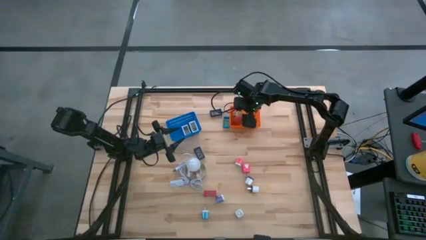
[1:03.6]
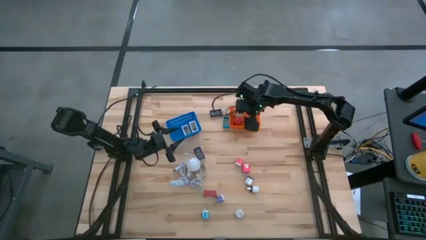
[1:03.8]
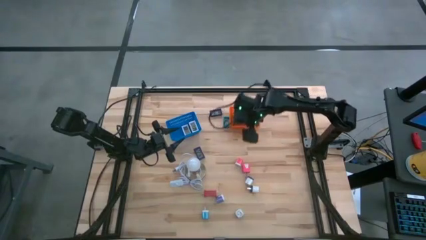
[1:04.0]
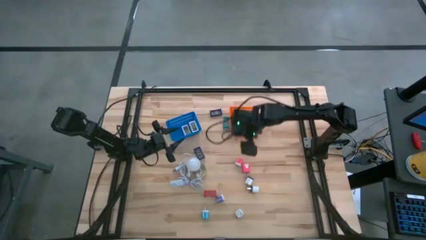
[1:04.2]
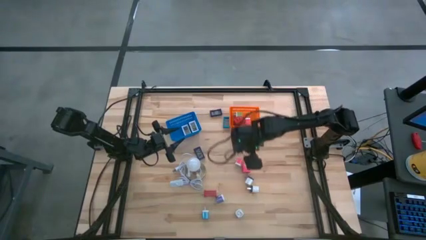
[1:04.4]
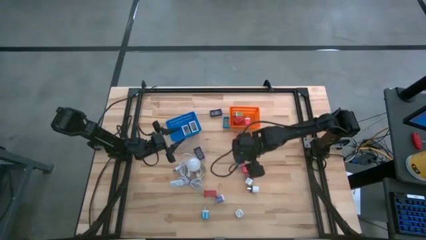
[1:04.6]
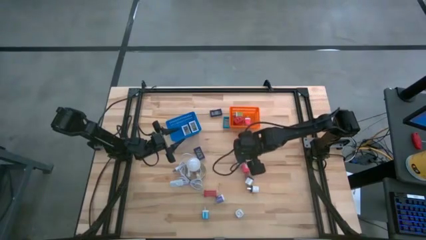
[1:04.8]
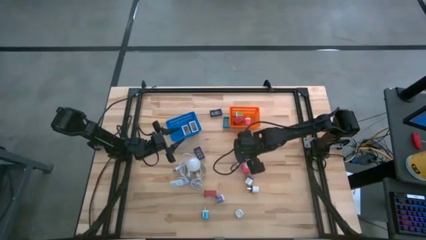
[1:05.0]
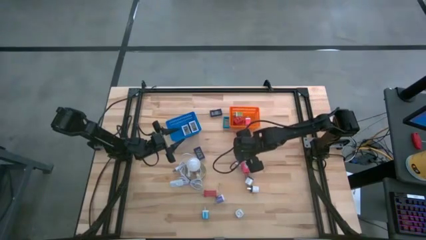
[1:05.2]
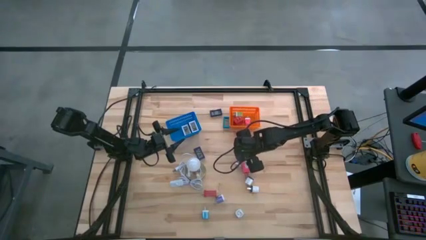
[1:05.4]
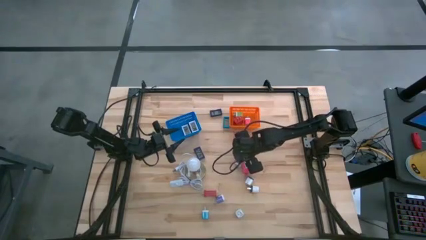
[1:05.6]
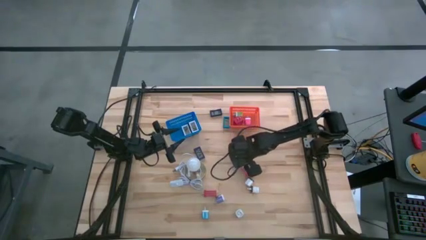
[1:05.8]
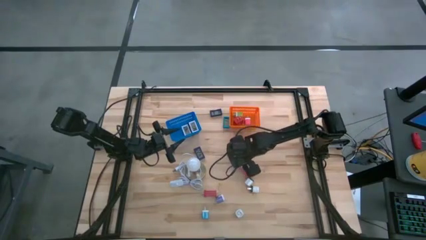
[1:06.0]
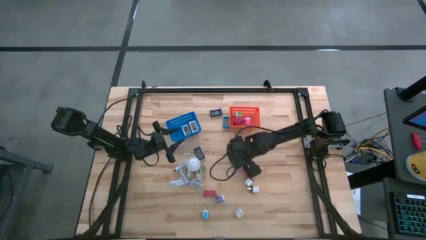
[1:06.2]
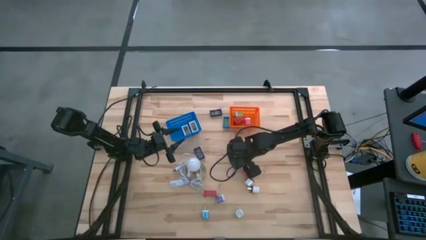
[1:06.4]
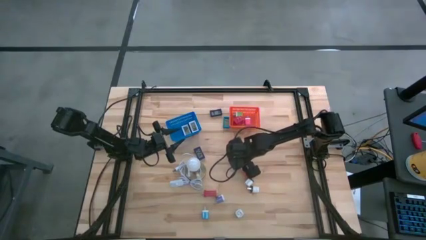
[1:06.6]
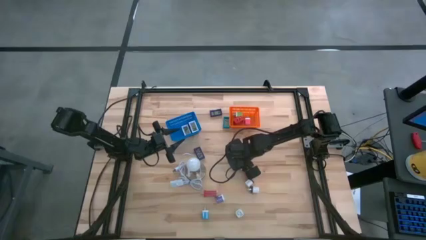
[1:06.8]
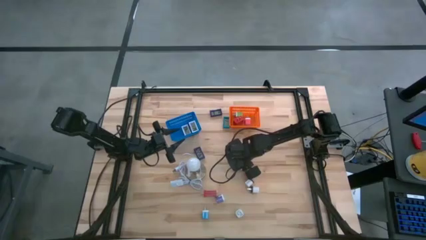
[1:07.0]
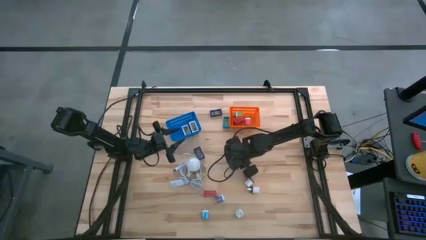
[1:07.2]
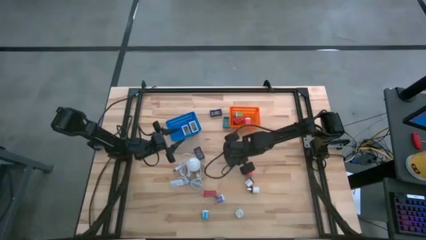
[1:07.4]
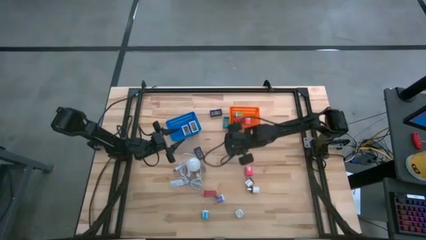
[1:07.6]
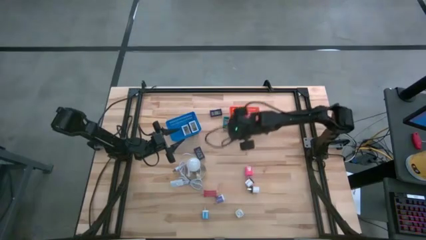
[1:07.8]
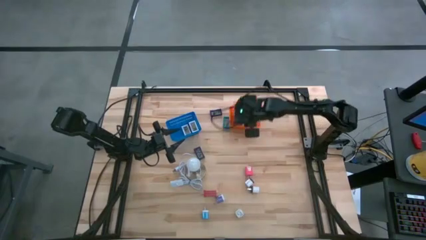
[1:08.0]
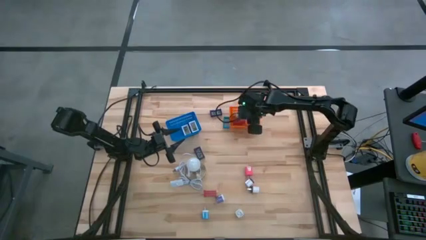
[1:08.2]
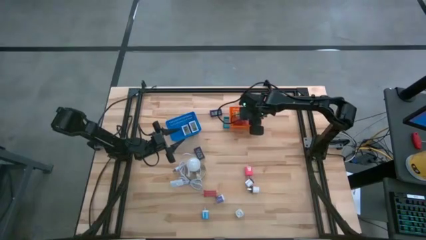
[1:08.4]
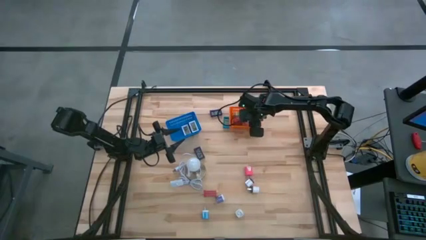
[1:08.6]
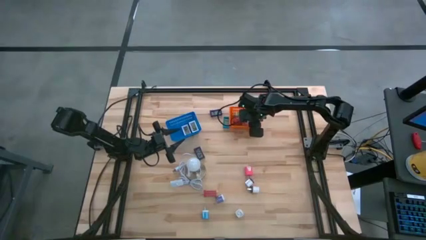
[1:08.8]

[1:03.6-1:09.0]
Task: Pick & Place Office items
Put the top pink charger adapter into the orange bin

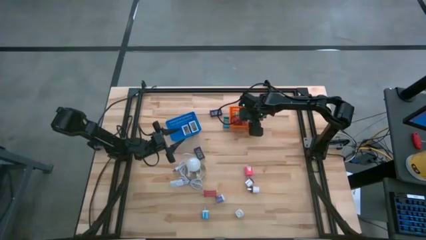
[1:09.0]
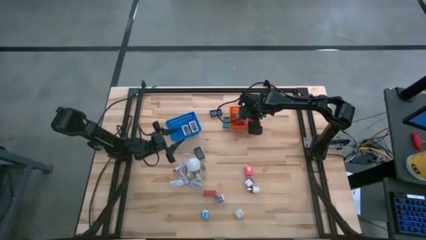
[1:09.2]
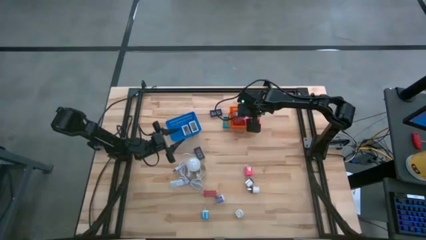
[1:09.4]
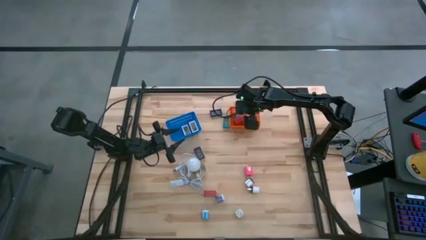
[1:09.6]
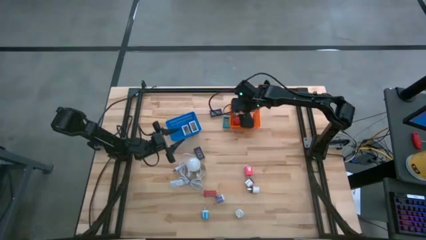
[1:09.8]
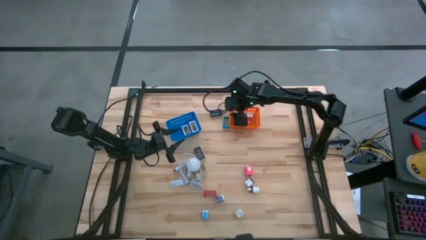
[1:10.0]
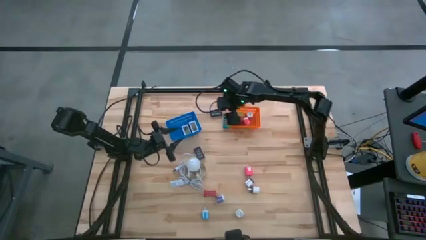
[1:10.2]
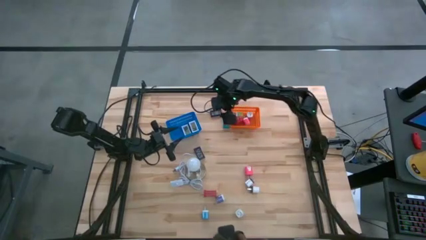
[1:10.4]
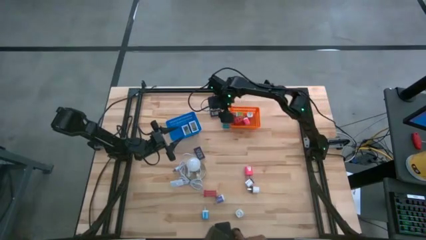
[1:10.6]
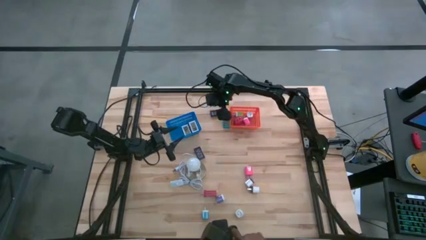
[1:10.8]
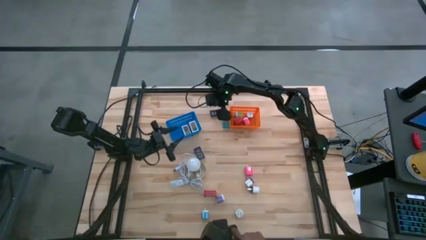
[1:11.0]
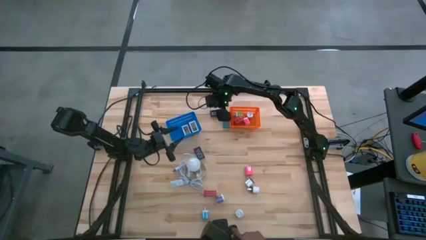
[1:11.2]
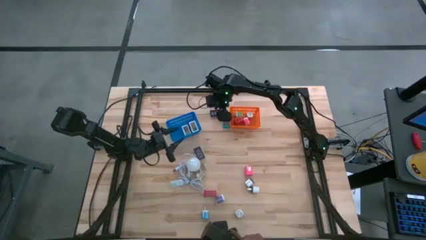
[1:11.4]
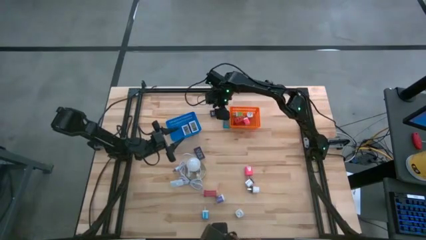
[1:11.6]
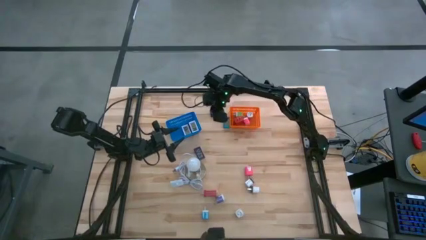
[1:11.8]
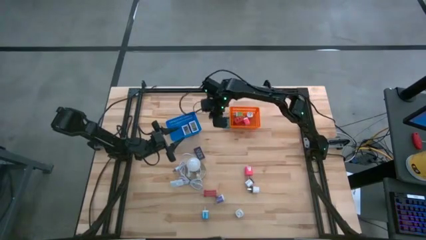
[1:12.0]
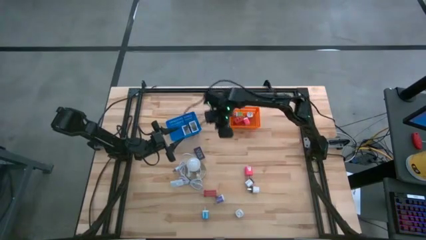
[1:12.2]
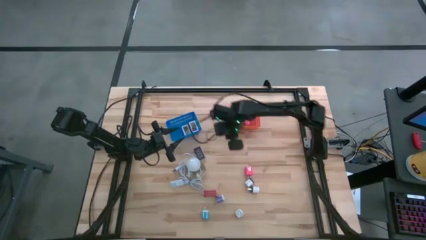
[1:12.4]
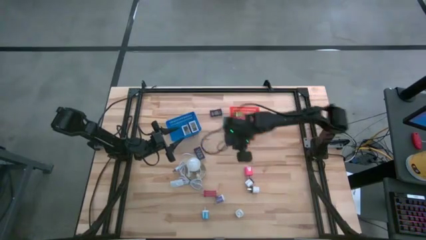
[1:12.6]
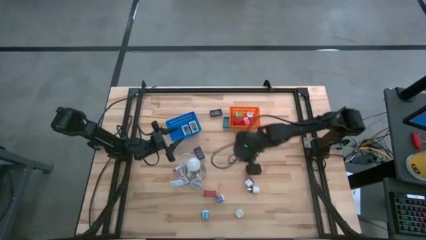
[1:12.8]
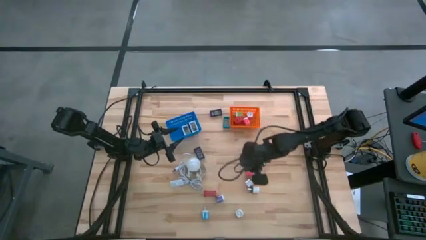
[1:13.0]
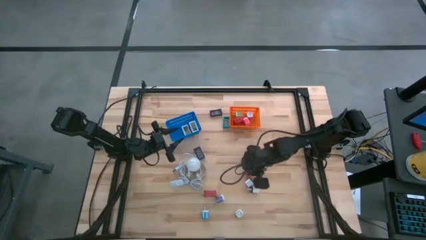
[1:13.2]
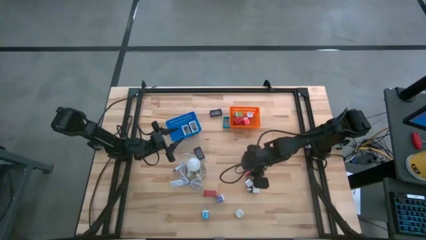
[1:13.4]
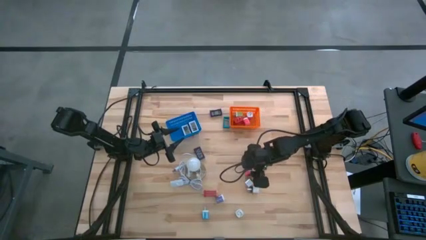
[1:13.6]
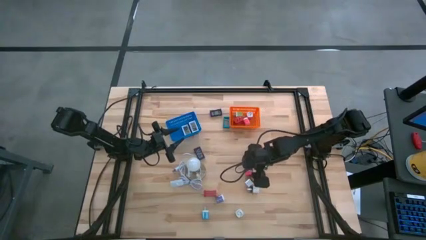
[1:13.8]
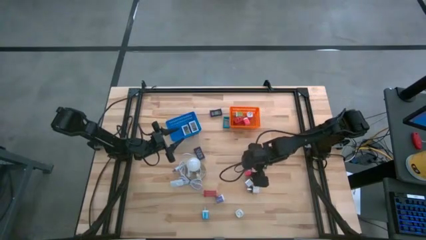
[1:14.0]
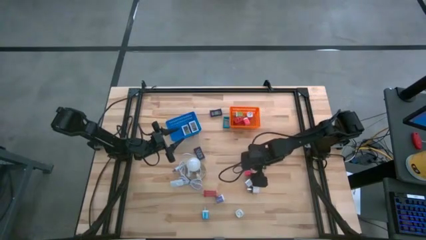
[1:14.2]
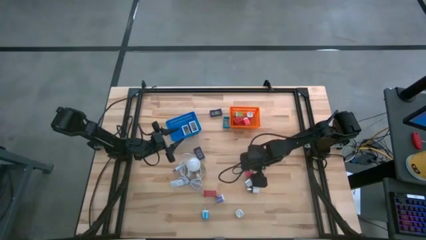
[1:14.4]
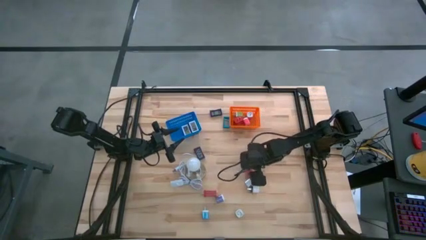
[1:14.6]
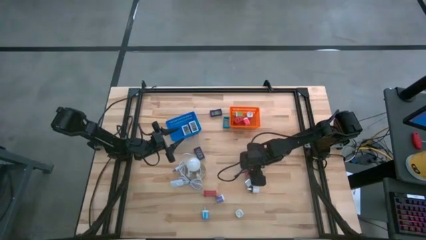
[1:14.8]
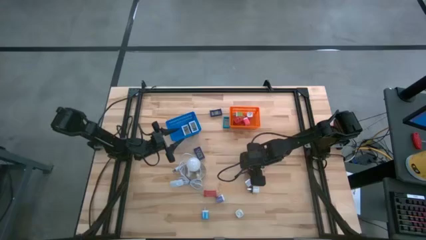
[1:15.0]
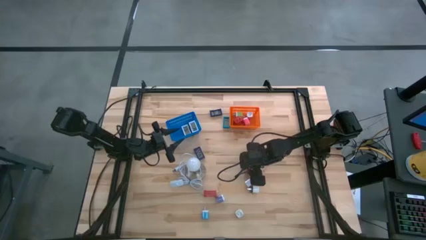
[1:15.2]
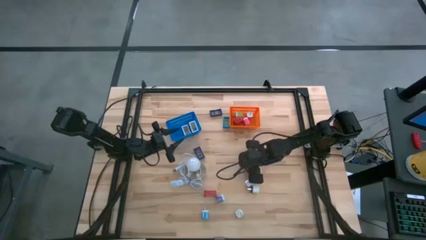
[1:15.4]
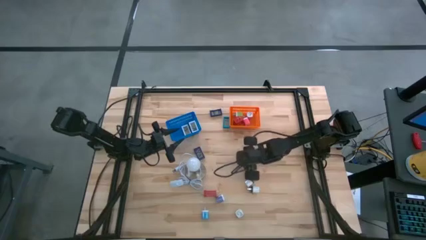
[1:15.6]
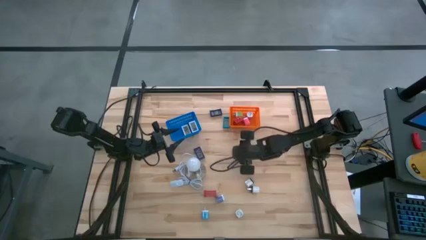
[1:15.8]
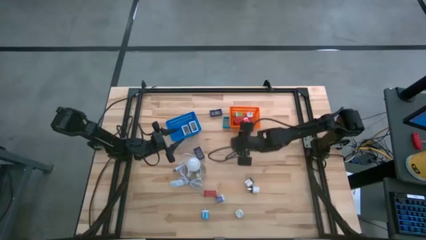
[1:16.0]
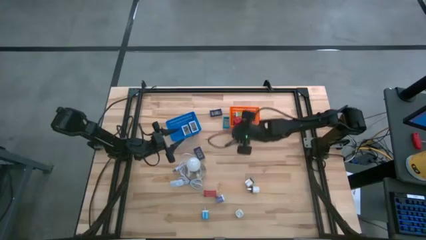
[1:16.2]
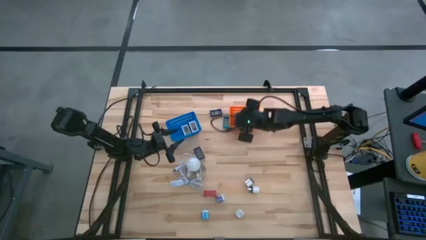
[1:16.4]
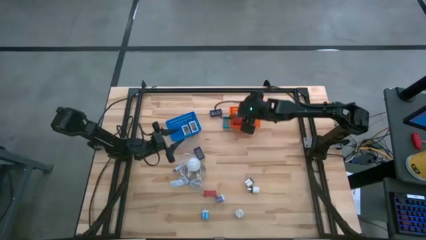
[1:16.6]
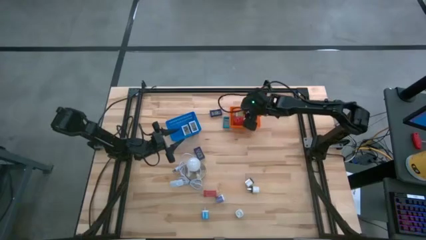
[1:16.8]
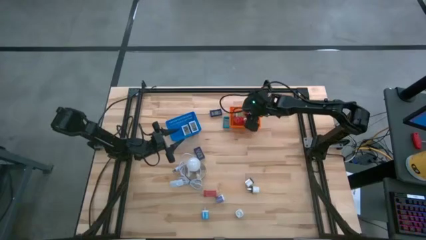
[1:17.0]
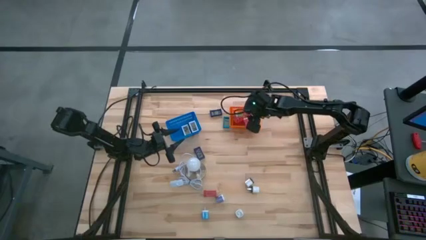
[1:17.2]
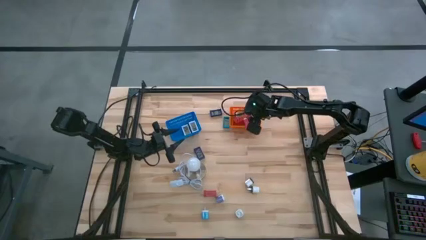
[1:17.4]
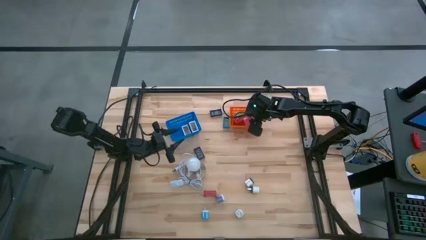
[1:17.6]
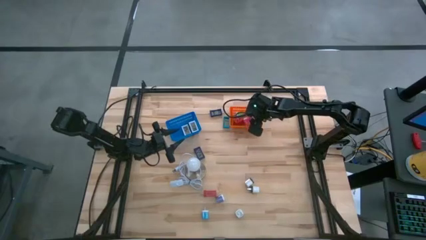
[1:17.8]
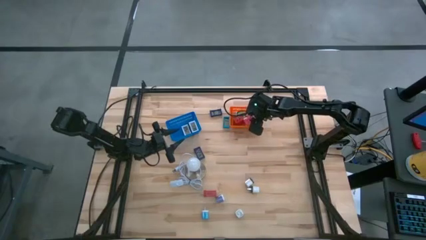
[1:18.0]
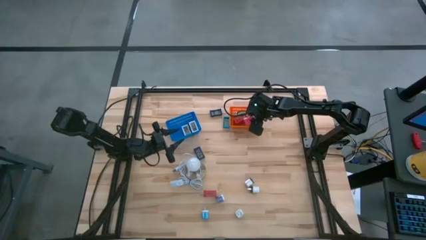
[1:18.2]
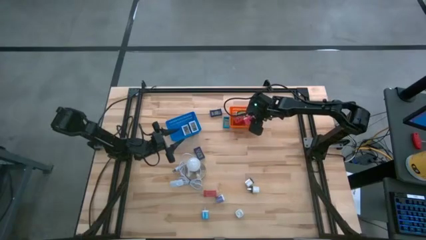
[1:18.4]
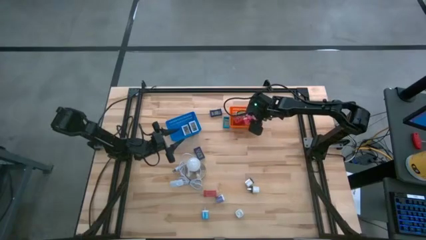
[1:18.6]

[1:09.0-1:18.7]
Put the pink charger adapter into the orange bin

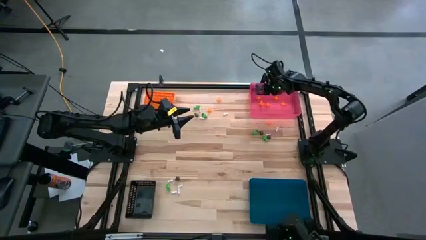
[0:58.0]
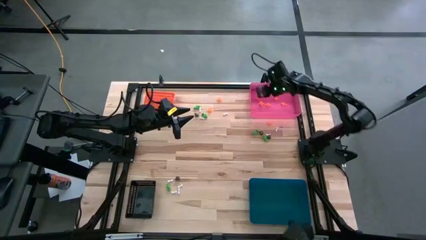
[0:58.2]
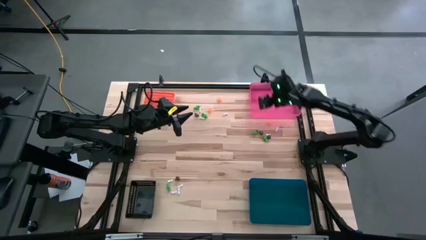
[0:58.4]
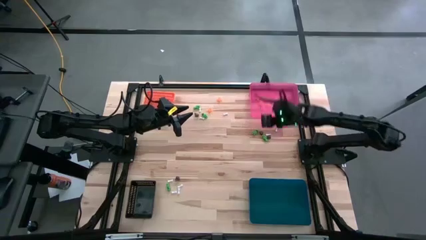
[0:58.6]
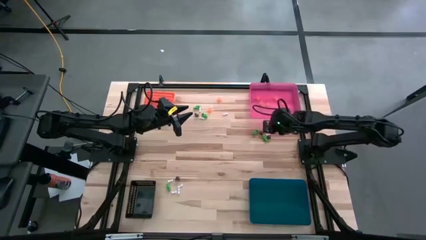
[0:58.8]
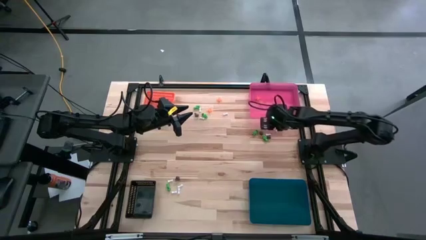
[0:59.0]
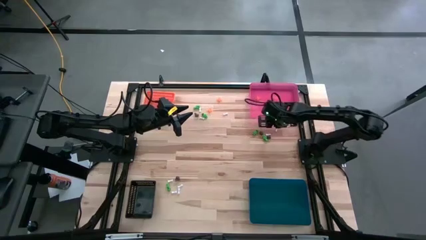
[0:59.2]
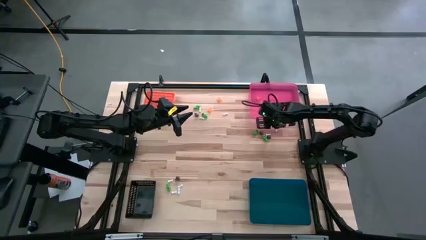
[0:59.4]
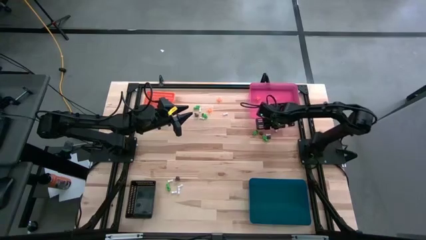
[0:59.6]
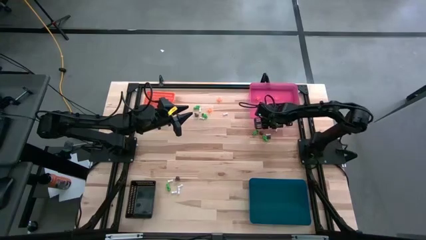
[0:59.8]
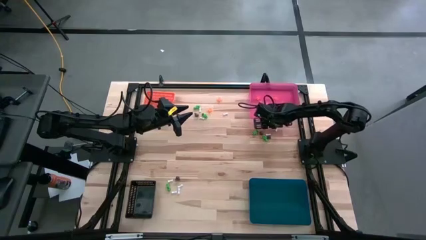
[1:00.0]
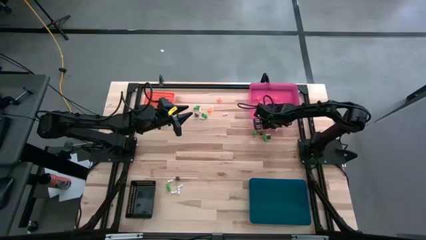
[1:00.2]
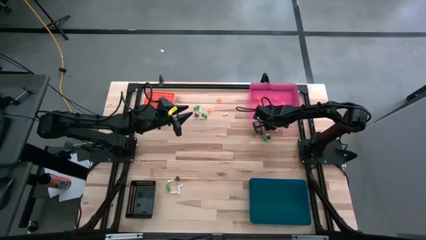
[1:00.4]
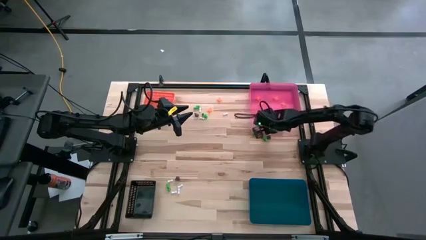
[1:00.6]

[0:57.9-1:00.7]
Task: Sort Halloween decoration
Put the bottom right orange spider toy into the pink bin
